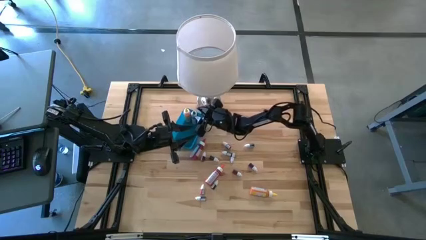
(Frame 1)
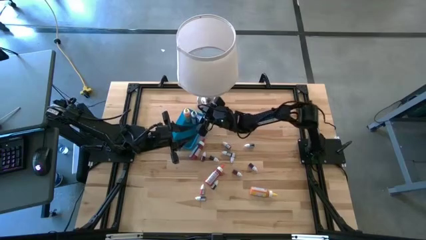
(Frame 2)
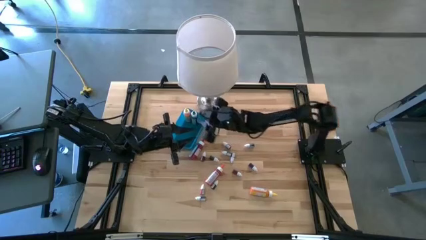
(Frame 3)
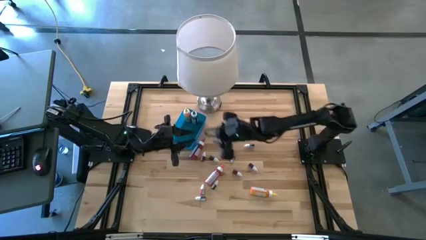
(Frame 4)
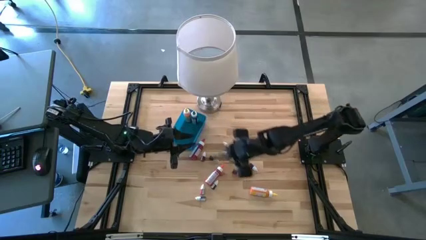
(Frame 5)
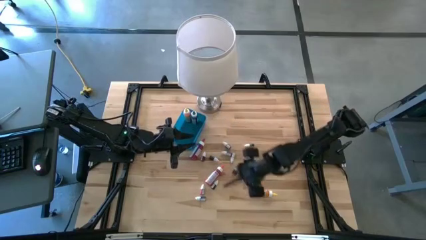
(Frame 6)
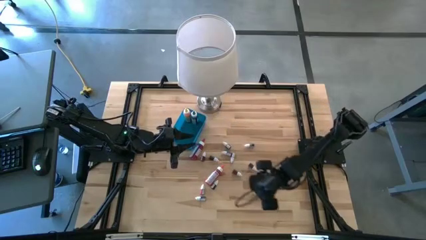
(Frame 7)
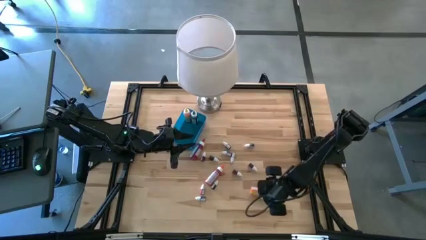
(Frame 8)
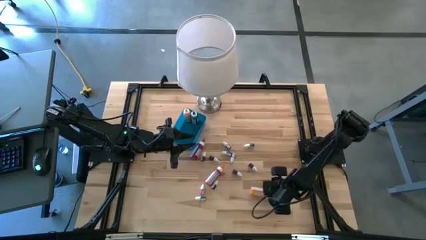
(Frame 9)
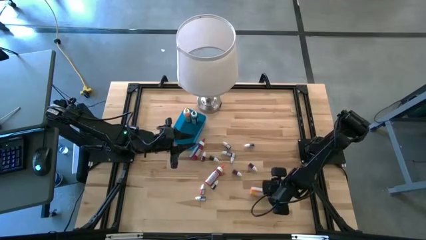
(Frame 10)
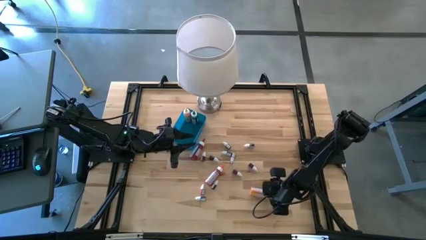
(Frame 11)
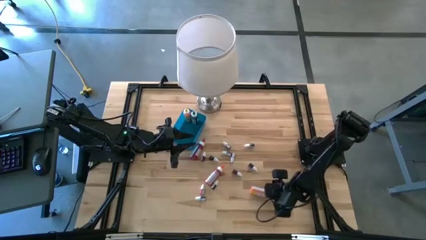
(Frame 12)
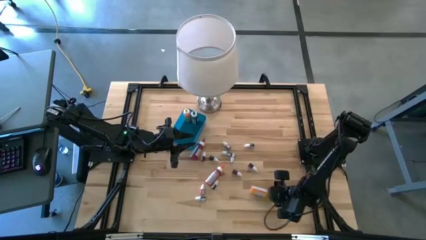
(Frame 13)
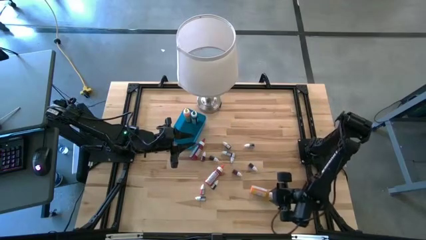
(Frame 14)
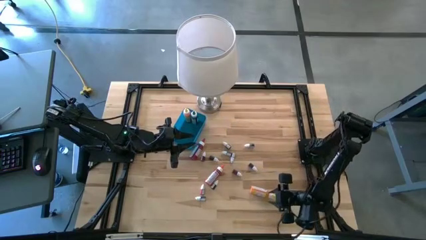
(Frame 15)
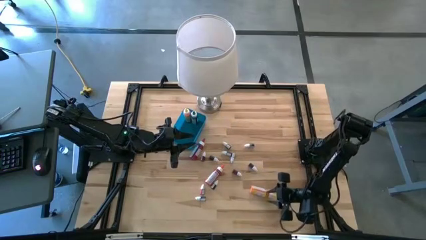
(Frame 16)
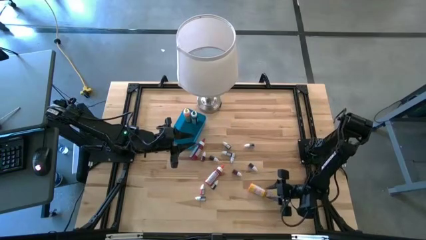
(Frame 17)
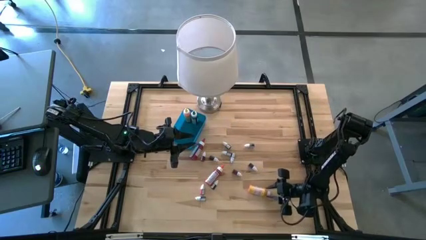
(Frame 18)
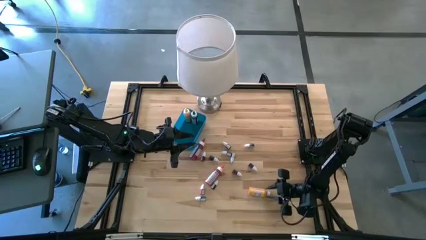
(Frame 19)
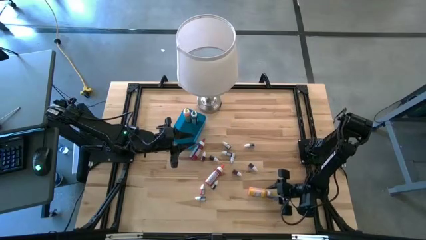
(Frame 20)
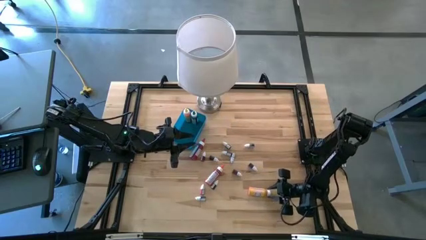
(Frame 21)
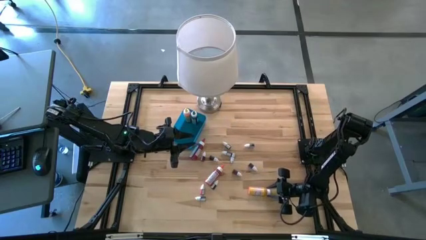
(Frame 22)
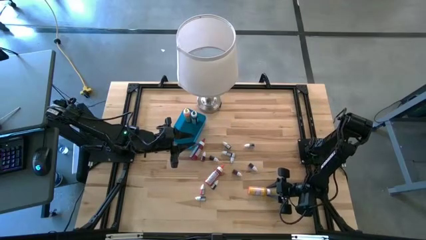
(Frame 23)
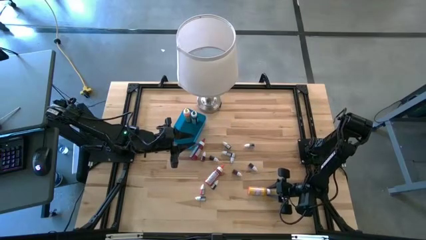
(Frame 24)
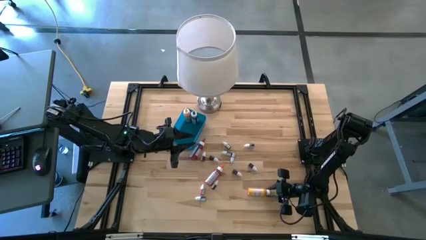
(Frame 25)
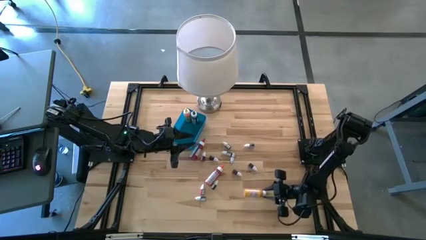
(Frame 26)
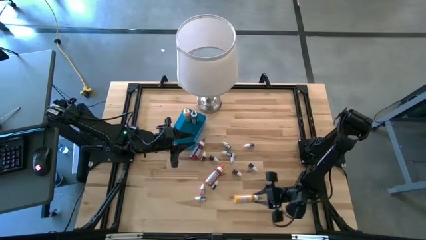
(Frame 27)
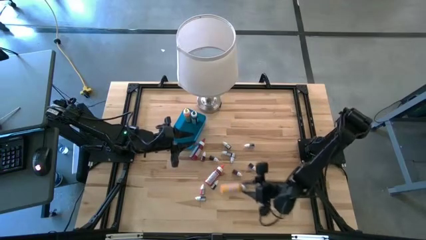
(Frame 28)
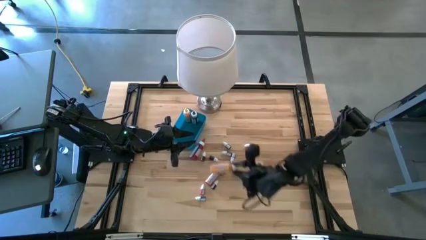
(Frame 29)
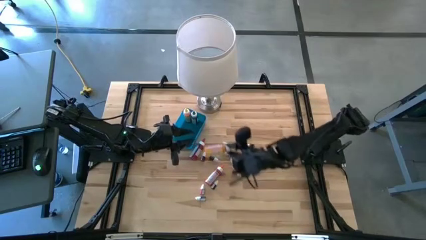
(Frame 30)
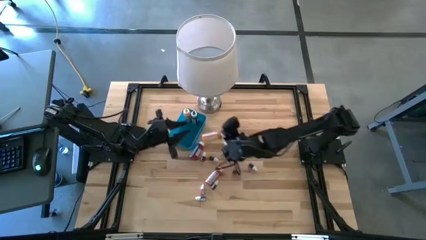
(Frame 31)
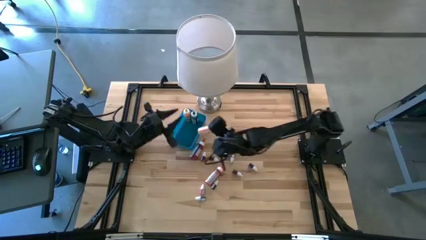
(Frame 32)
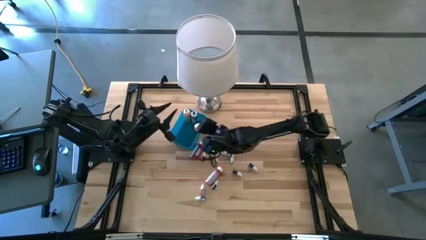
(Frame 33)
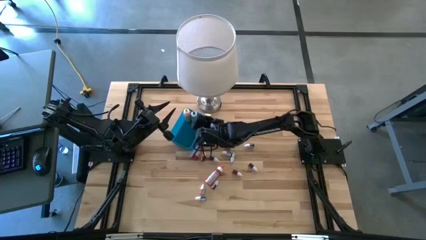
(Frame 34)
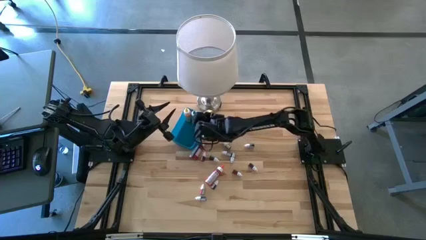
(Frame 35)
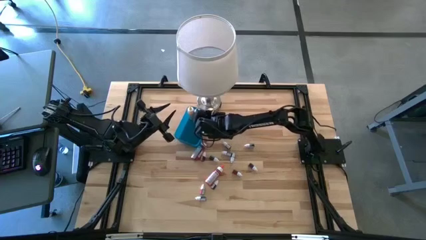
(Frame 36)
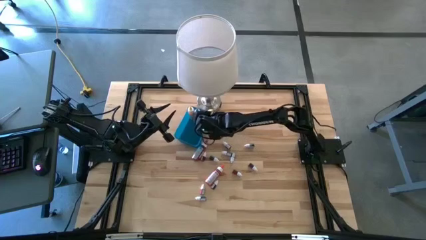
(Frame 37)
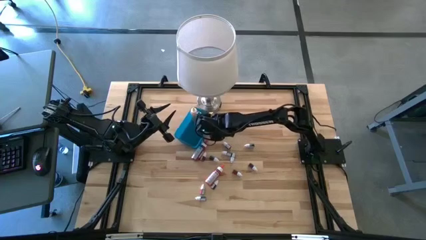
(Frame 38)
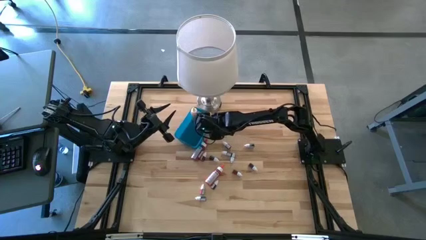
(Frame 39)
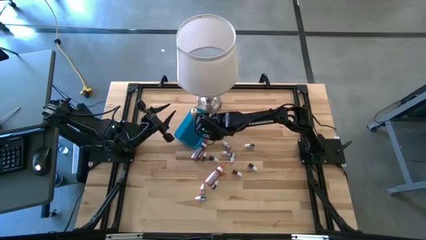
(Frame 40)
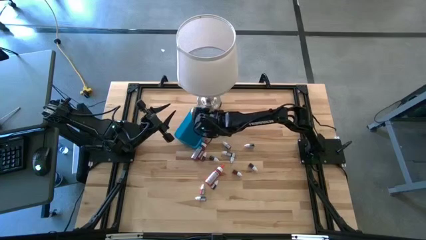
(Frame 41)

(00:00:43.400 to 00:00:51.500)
Task: Pick & Place food coloring
Put the large yellow food coloring bottle into the blue bin

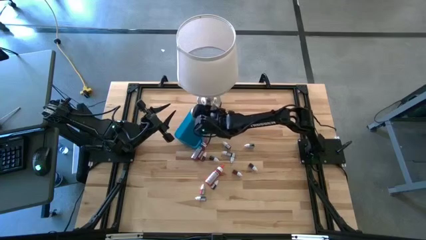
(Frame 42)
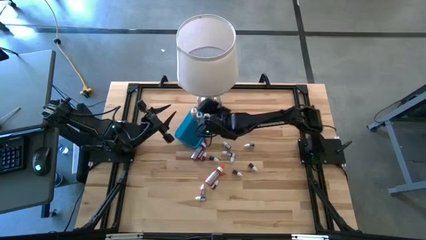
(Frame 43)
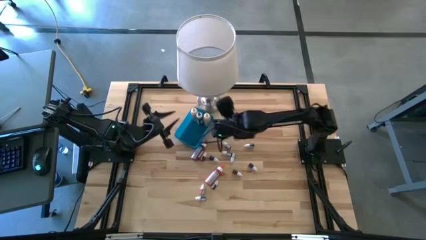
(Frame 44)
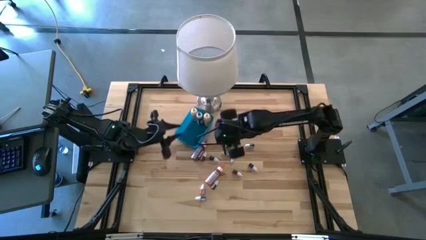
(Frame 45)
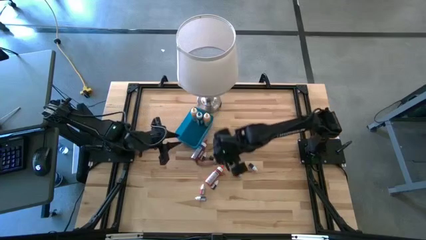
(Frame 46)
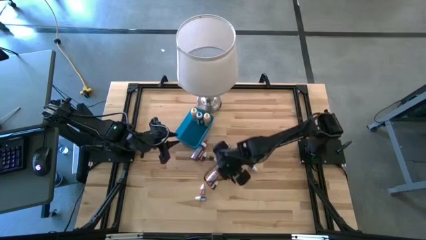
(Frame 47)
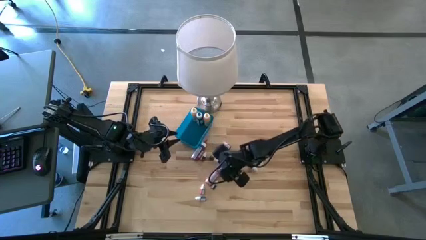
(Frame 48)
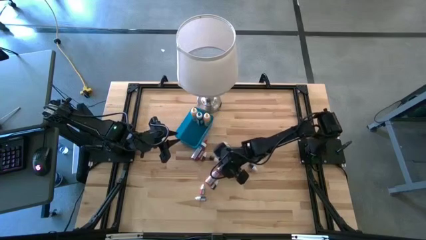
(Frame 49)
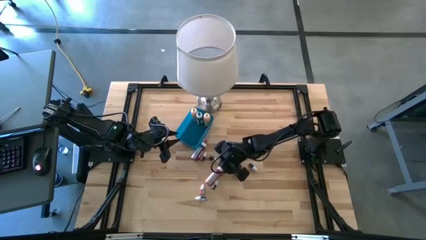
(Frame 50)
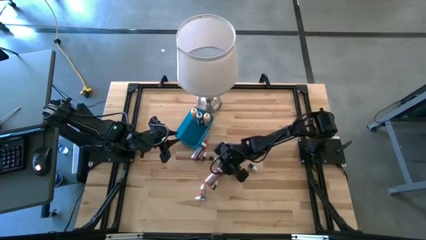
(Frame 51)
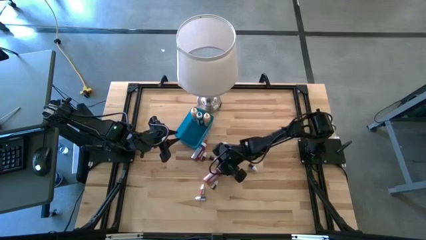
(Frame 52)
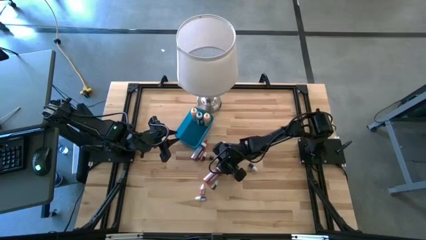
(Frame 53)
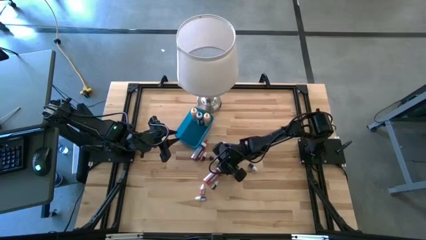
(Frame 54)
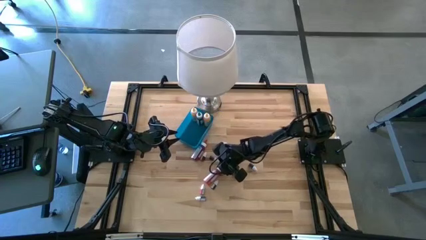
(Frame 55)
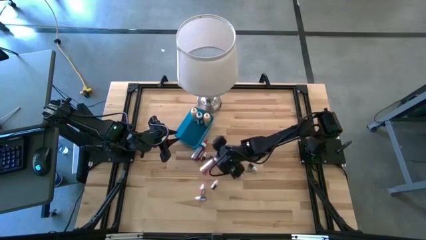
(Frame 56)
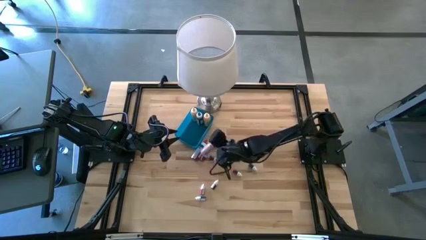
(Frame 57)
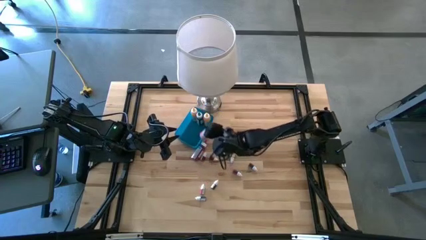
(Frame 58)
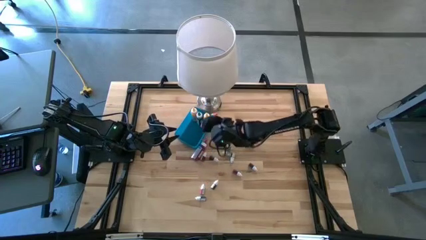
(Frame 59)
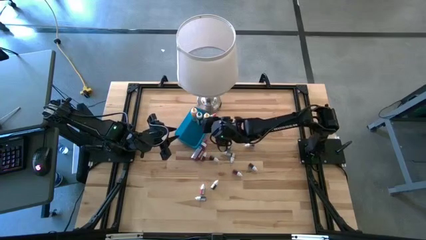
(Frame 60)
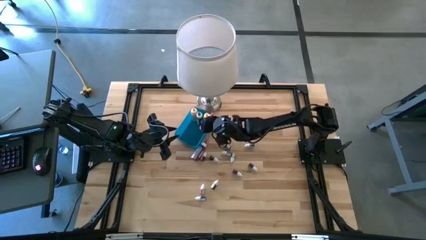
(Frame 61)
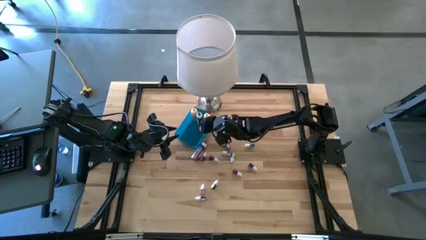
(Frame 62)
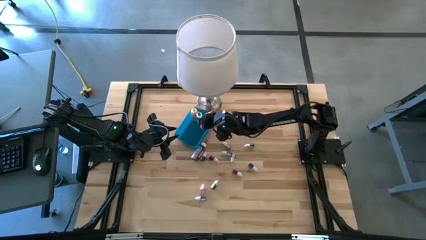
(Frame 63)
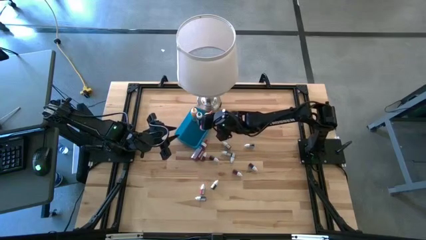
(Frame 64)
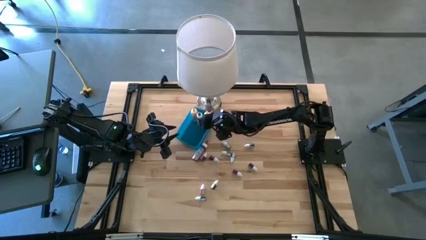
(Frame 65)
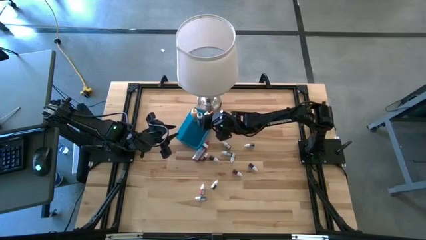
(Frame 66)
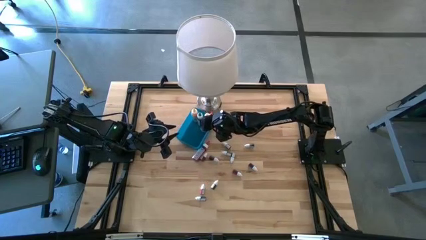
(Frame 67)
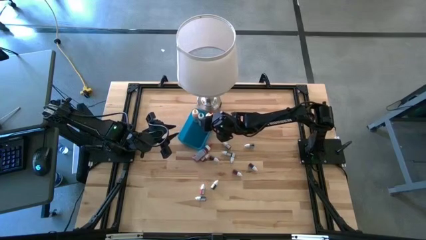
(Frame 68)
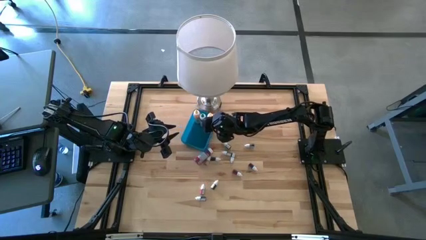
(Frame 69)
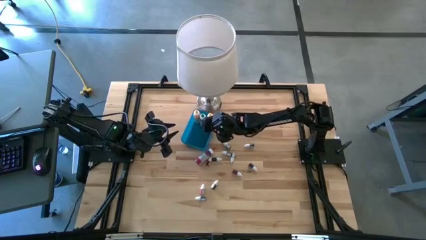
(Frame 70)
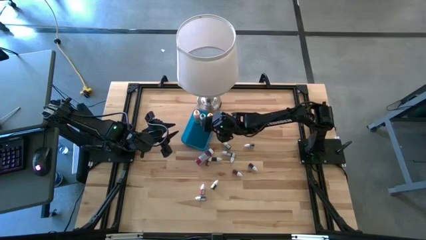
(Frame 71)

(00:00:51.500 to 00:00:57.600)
Put the large orange food coloring bottle into the blue bin
